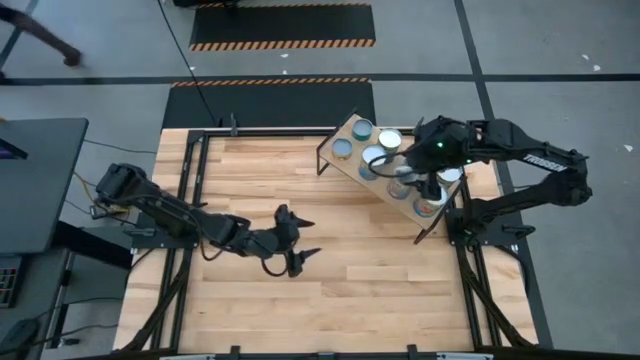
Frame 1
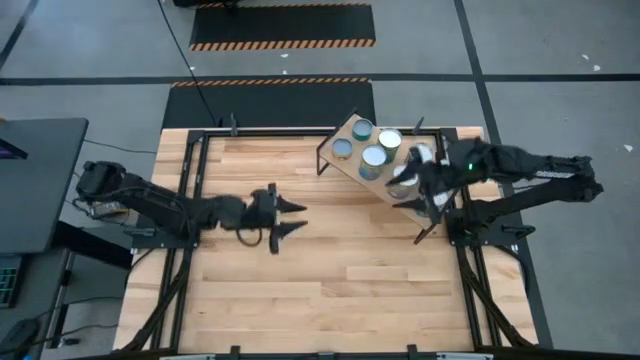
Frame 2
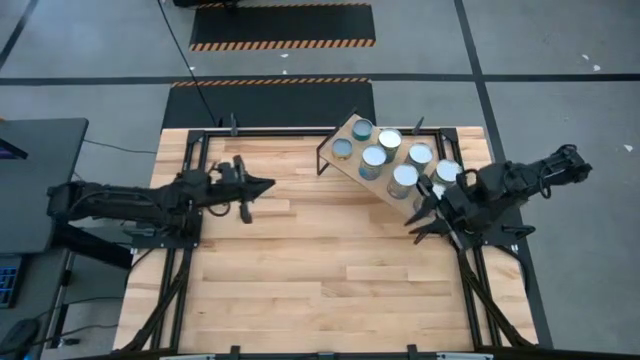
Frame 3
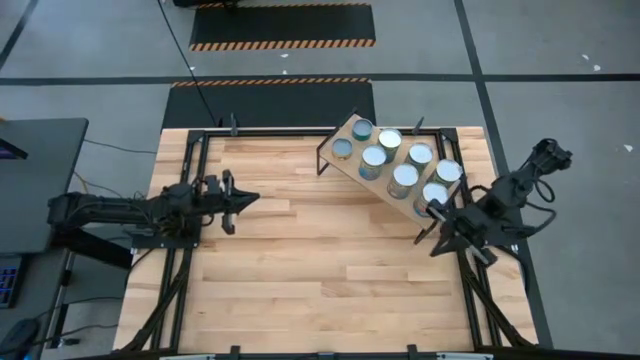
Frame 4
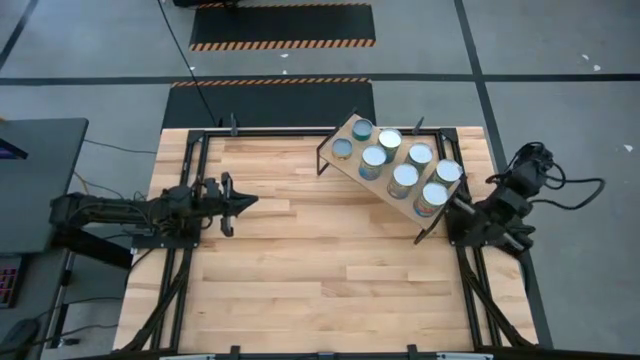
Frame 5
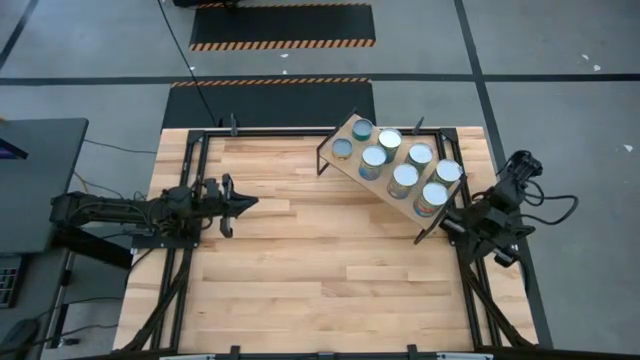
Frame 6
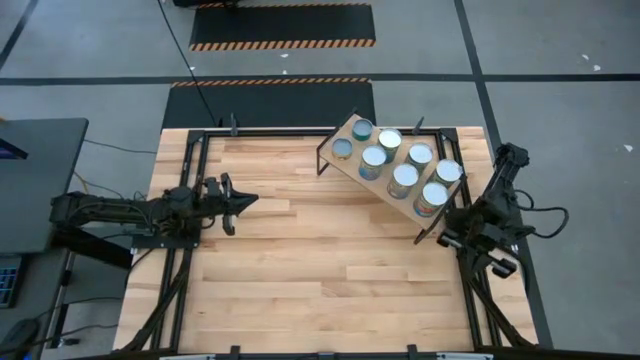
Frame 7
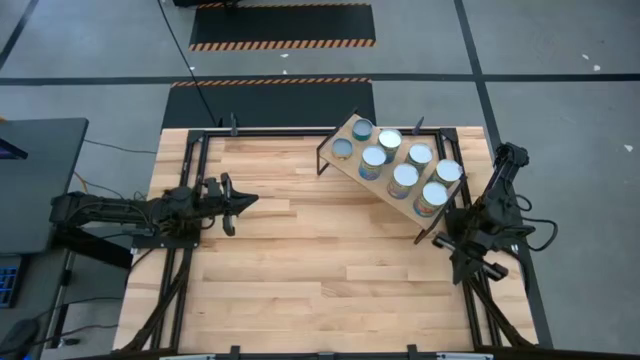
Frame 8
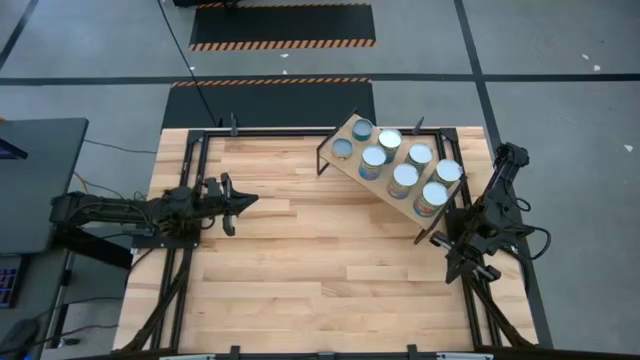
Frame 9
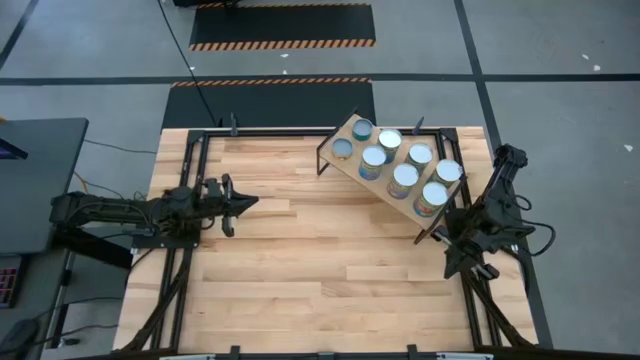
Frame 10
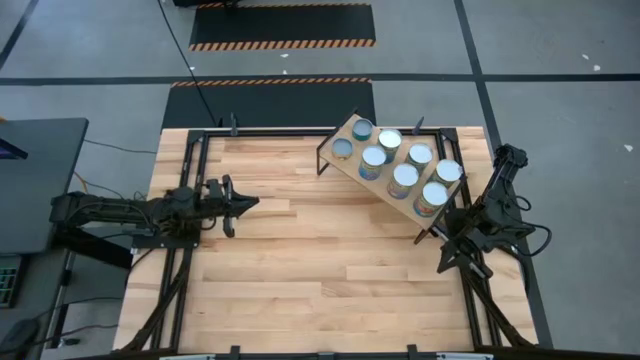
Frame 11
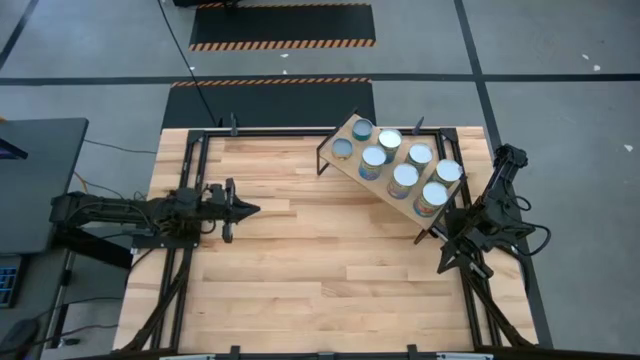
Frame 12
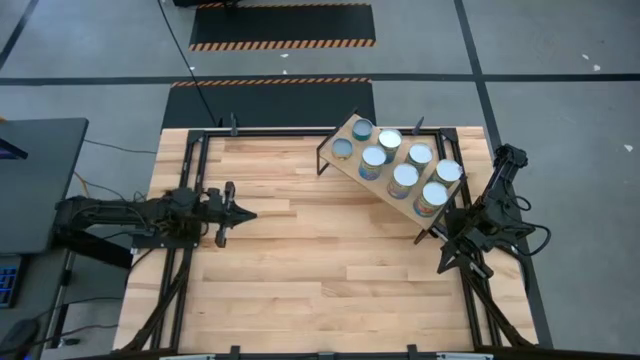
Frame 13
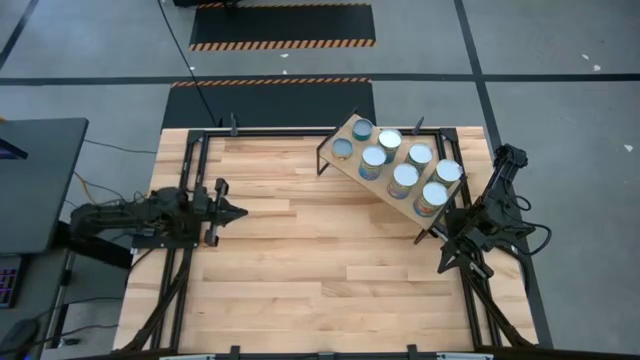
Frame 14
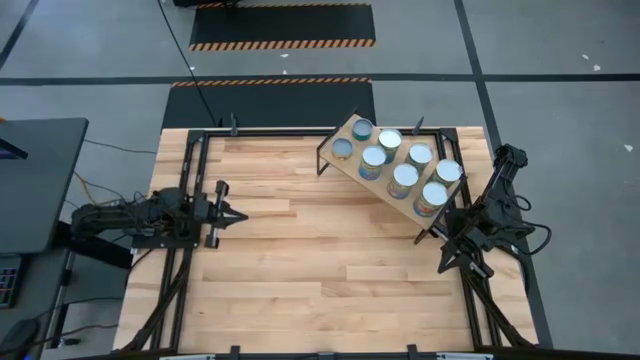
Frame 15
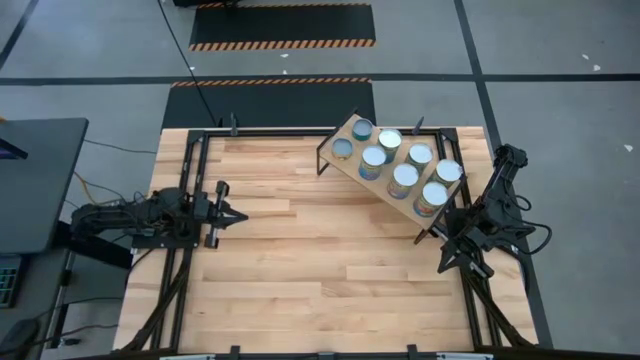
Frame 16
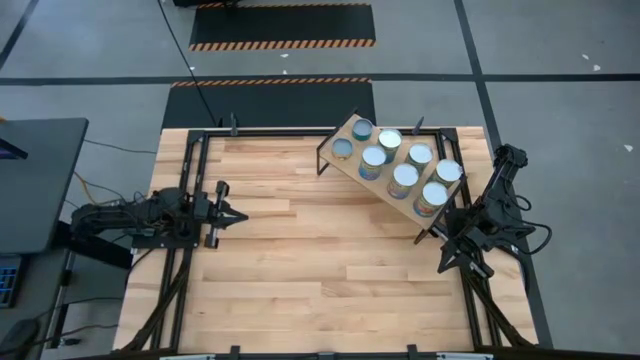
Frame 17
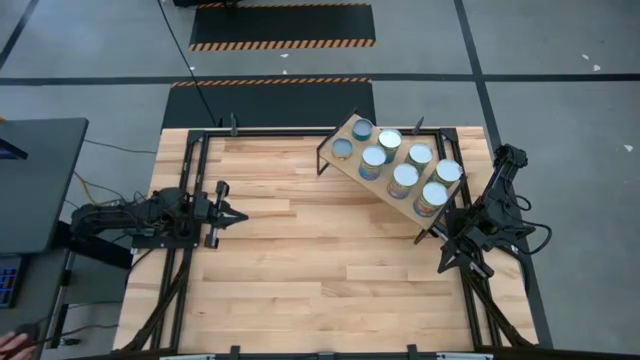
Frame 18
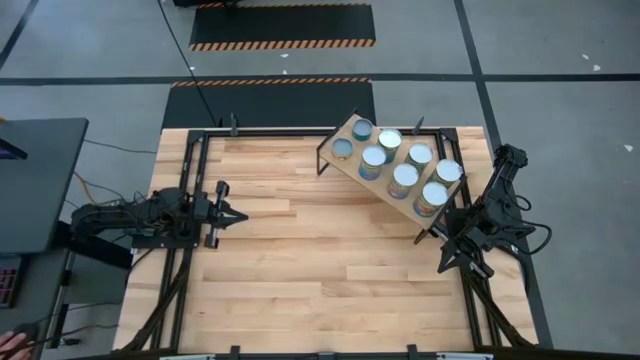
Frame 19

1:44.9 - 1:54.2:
Task: Pick and place cans onto a shelf
Return to Home Position

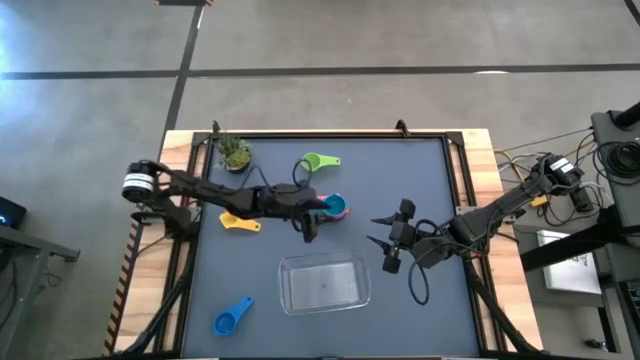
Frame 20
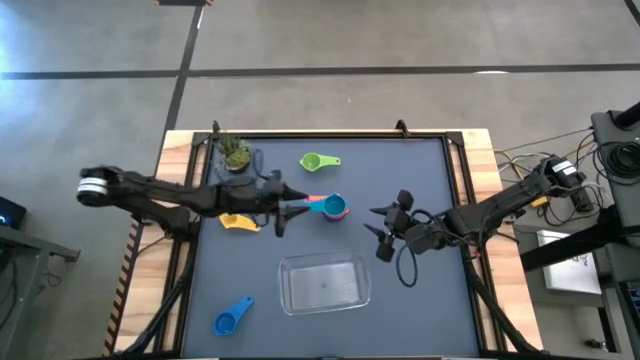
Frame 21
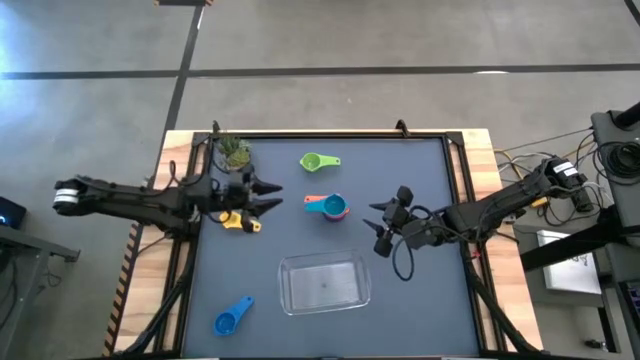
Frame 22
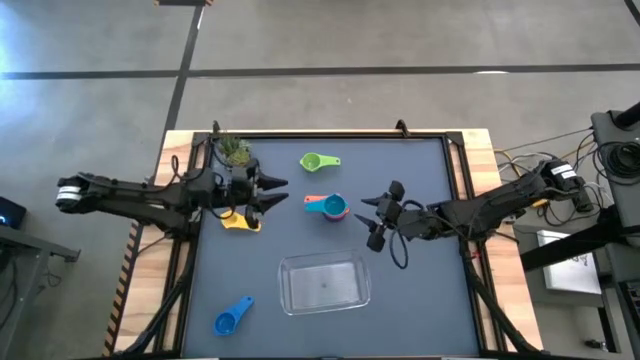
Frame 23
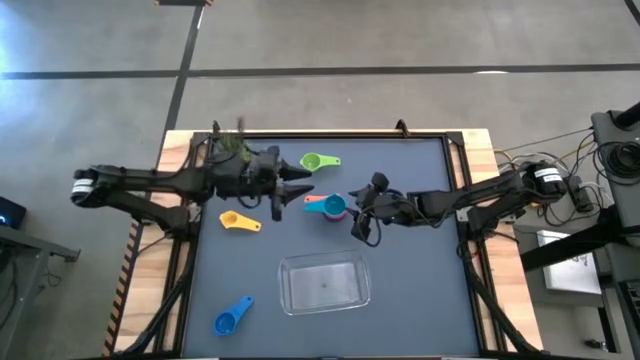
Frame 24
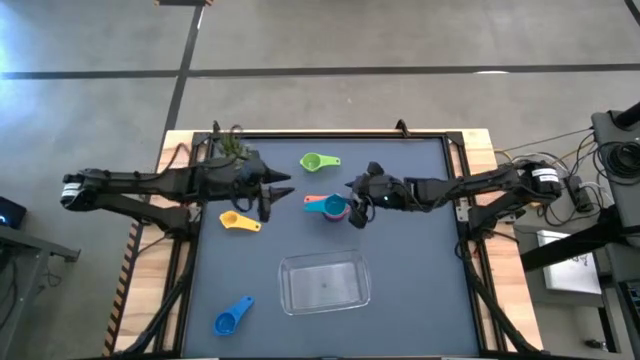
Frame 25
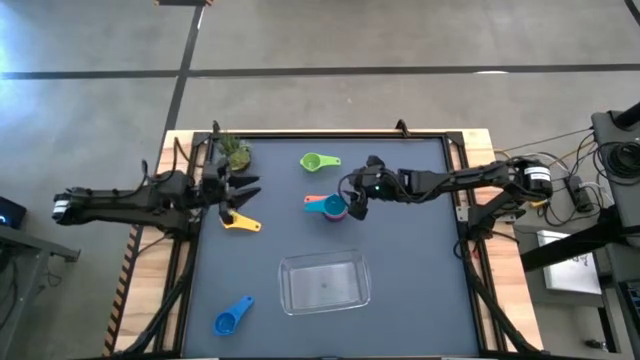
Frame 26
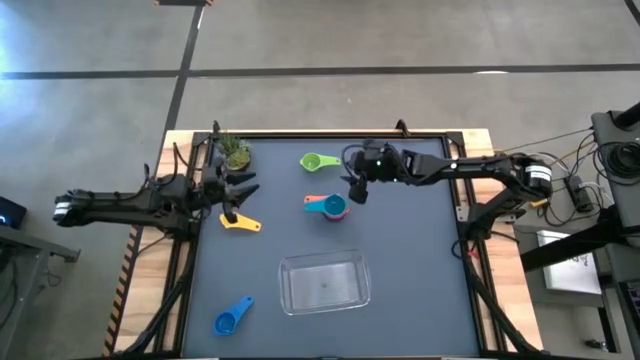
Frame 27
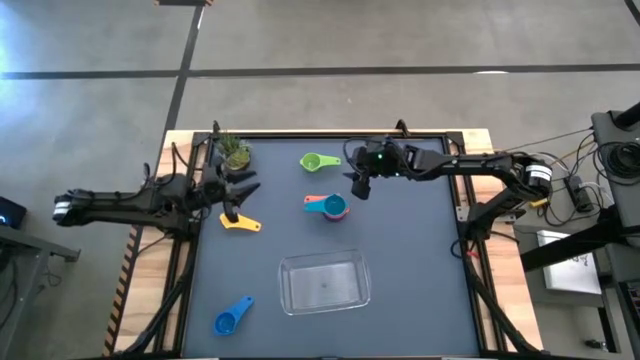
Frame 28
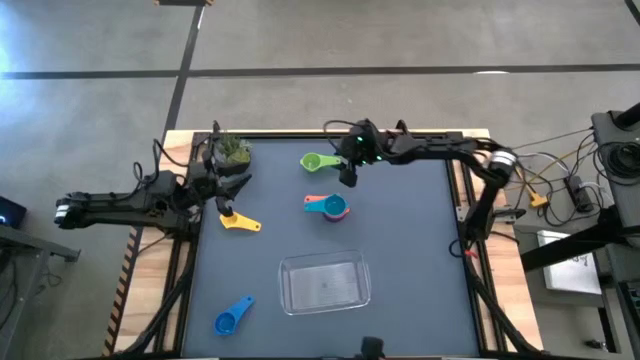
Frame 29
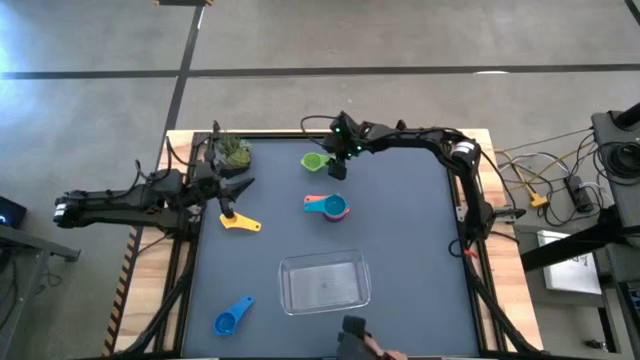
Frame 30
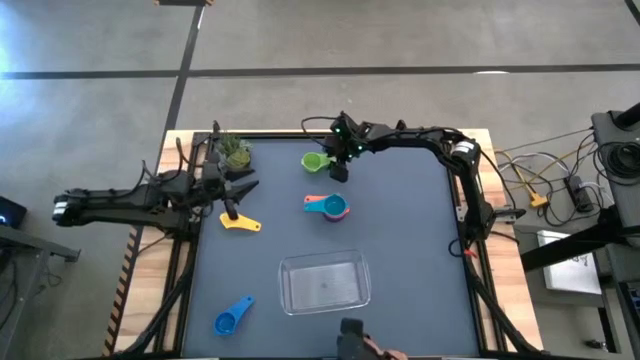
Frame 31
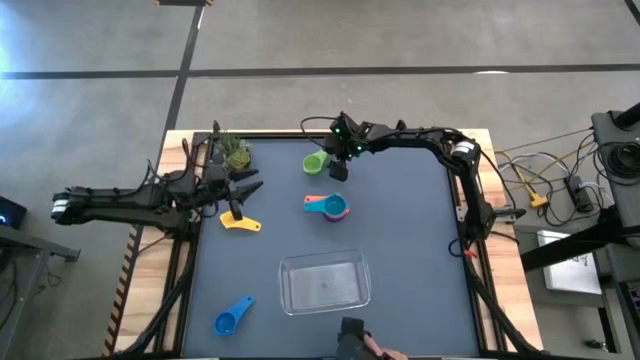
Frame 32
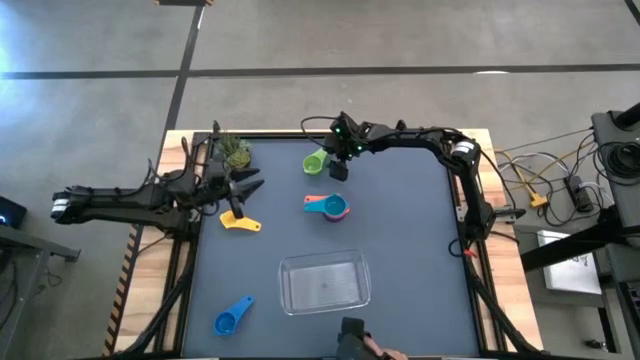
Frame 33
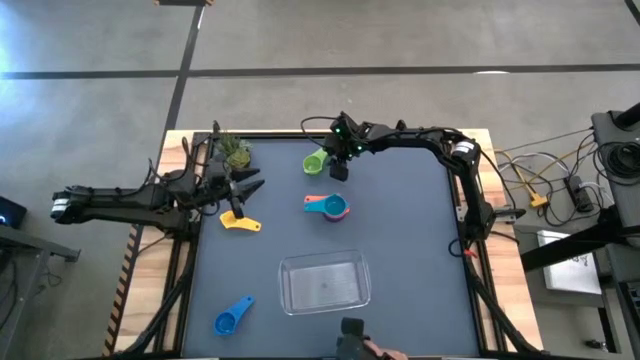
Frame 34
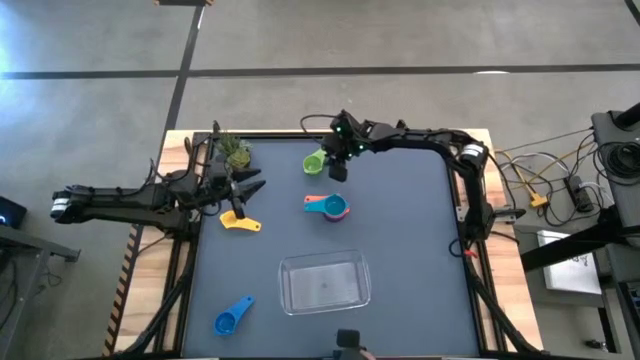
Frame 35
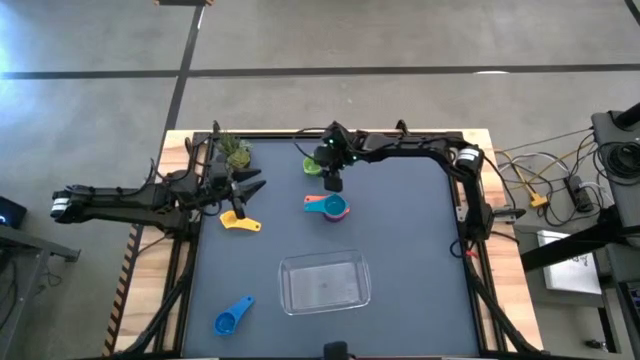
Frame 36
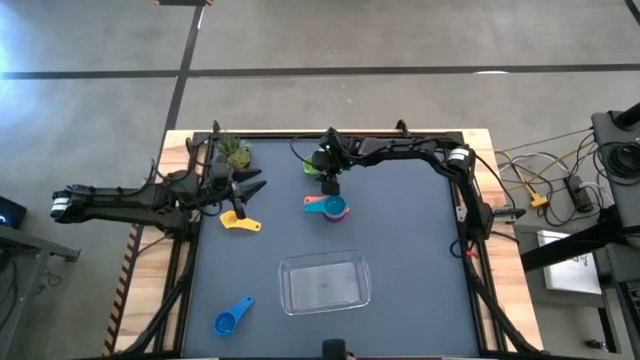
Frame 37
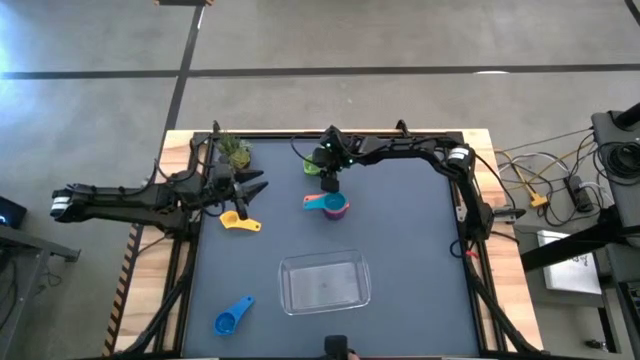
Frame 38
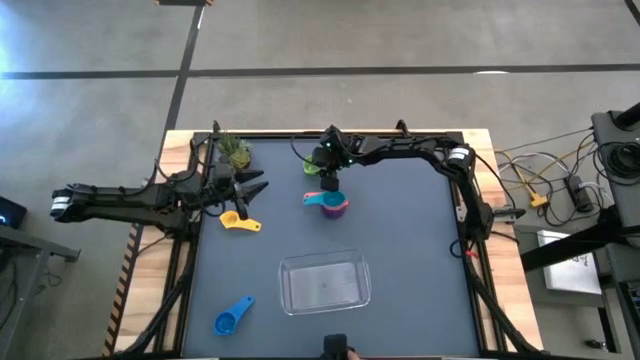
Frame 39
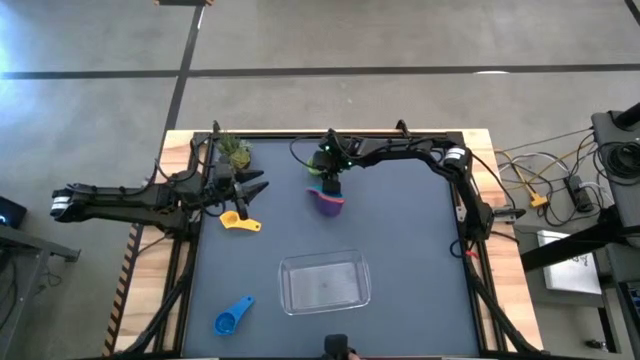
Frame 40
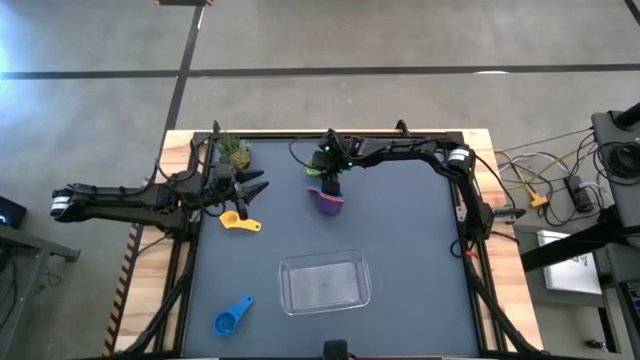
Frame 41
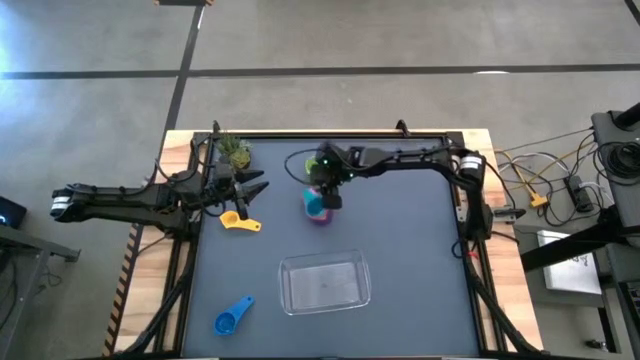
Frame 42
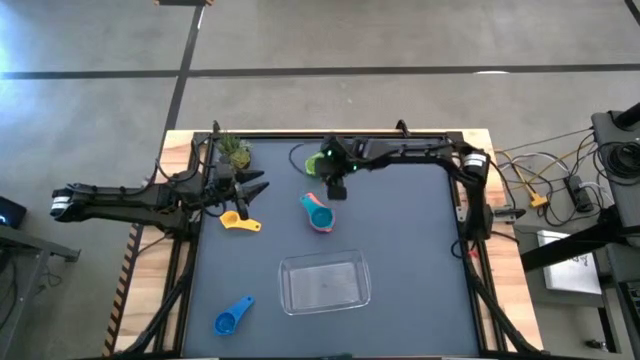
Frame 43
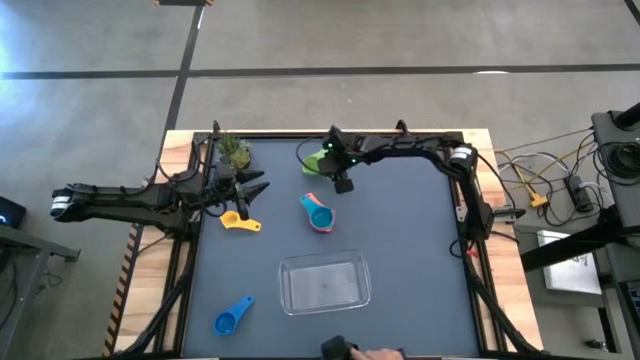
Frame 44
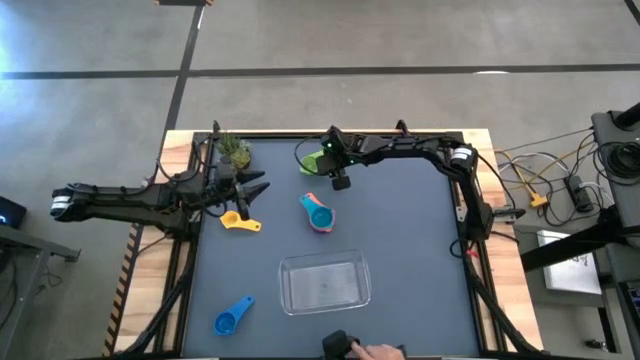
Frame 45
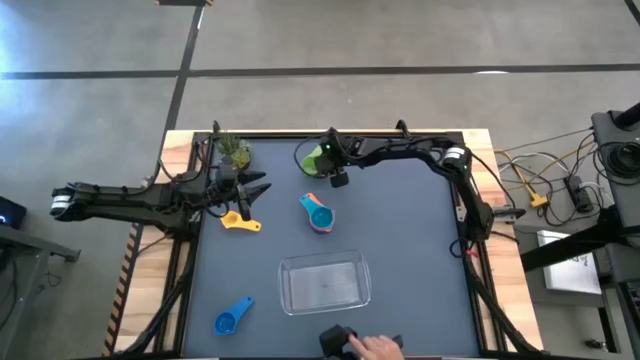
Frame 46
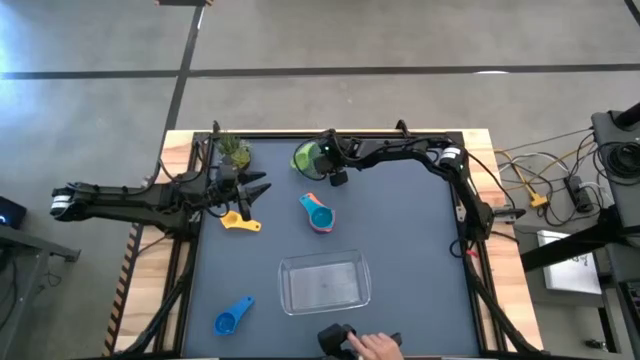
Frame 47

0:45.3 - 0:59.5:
Task: Nest measuring cups in basket
Stack the green measuring cup on top of the light blue measuring cup
